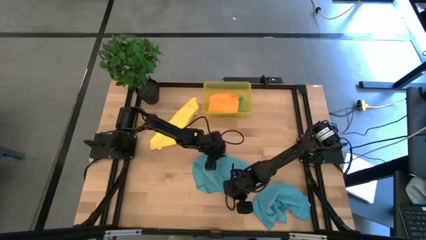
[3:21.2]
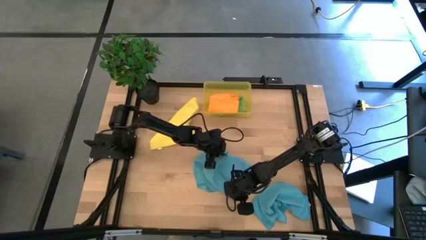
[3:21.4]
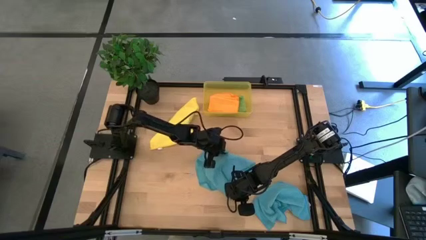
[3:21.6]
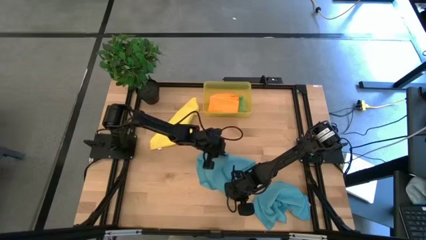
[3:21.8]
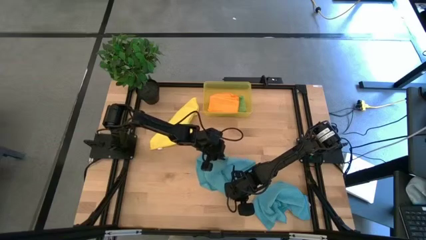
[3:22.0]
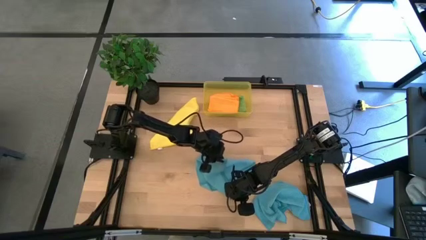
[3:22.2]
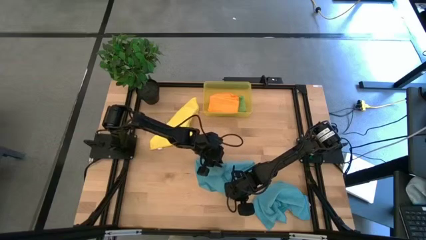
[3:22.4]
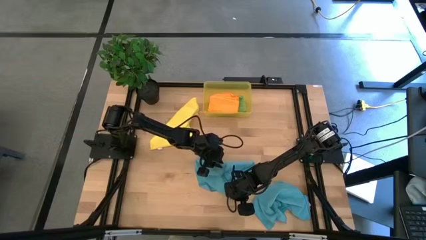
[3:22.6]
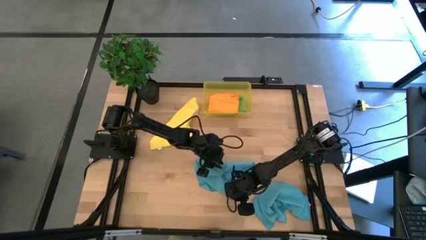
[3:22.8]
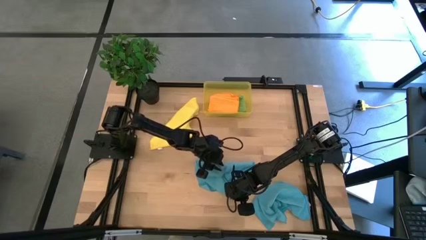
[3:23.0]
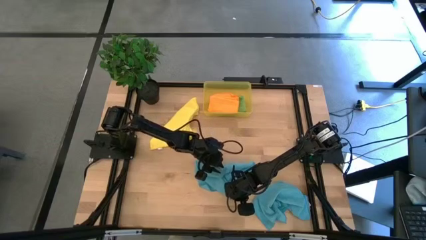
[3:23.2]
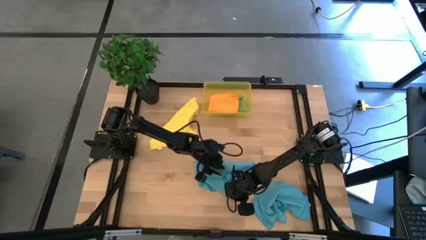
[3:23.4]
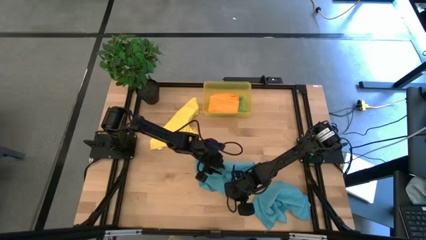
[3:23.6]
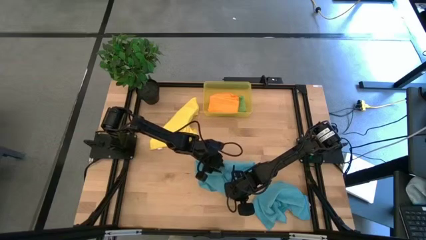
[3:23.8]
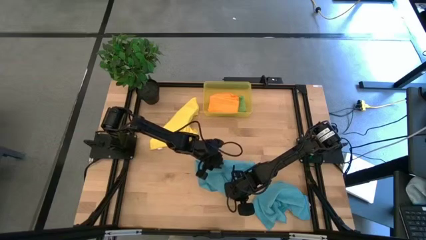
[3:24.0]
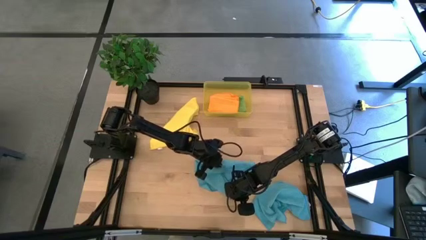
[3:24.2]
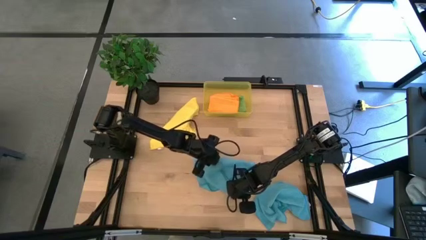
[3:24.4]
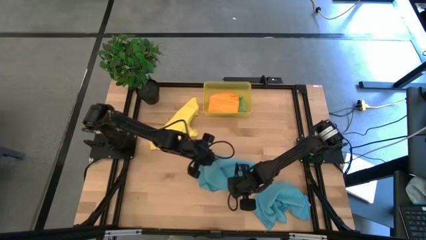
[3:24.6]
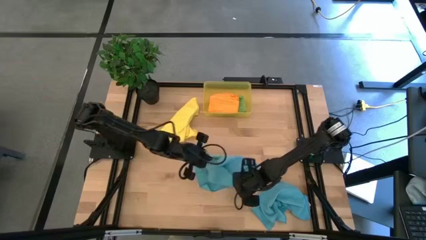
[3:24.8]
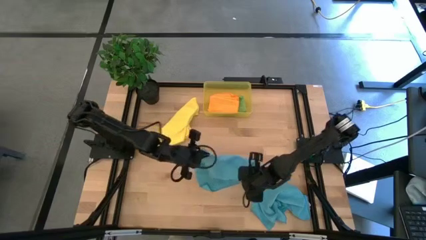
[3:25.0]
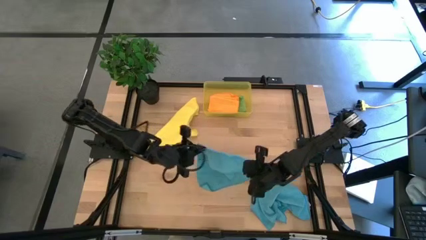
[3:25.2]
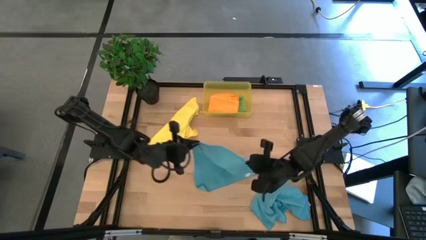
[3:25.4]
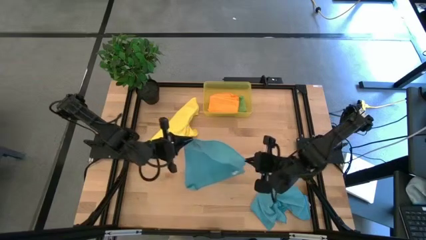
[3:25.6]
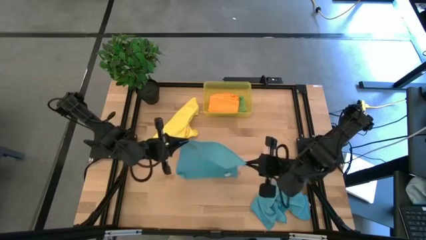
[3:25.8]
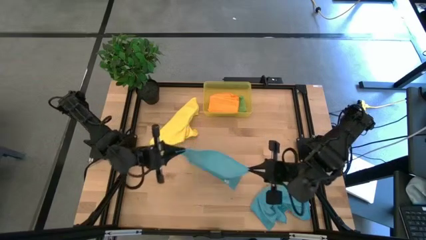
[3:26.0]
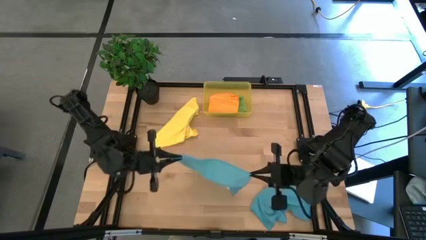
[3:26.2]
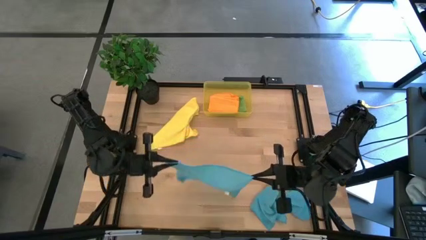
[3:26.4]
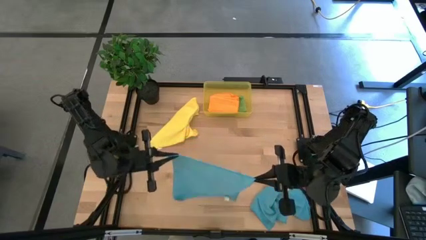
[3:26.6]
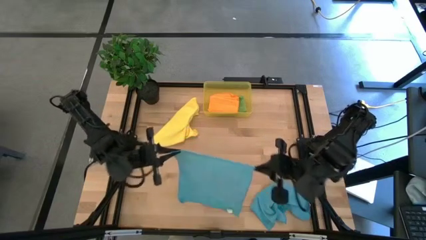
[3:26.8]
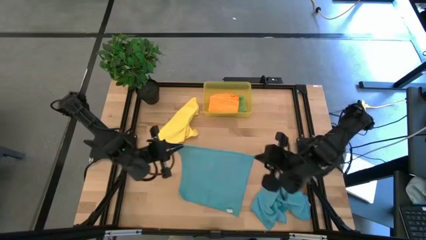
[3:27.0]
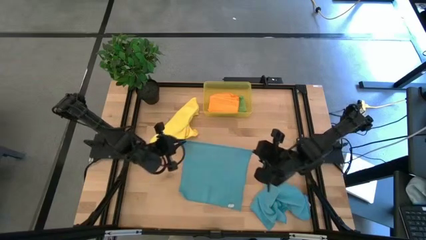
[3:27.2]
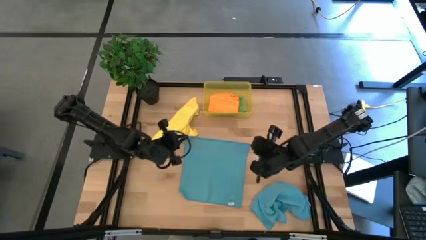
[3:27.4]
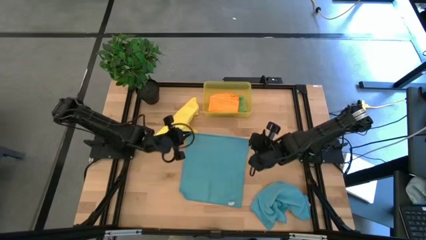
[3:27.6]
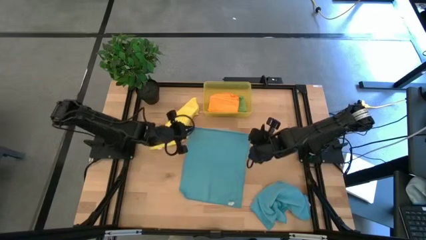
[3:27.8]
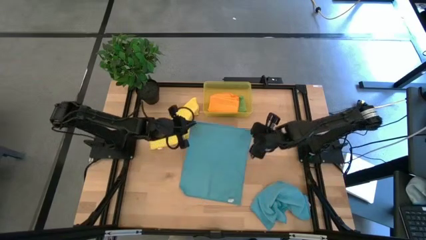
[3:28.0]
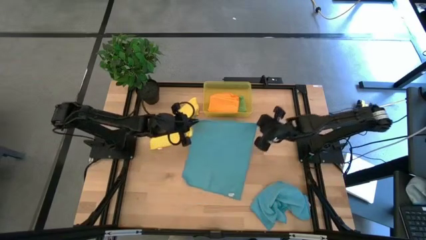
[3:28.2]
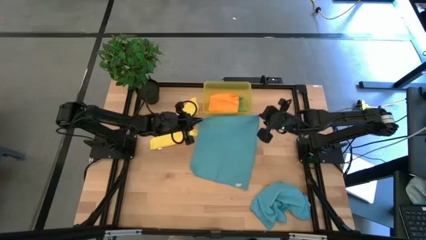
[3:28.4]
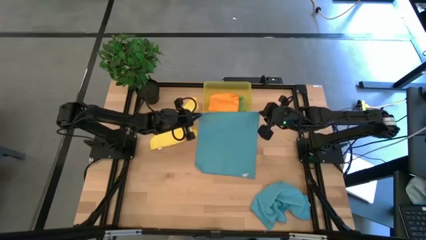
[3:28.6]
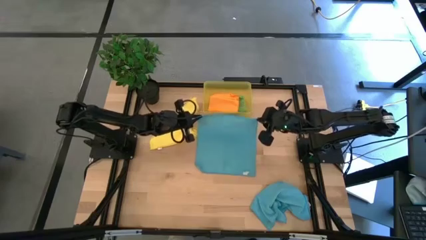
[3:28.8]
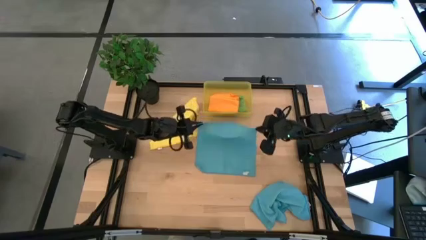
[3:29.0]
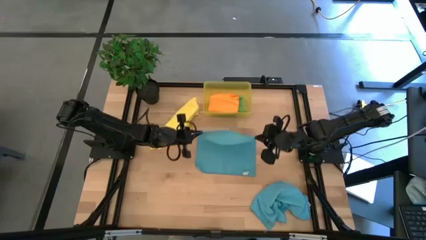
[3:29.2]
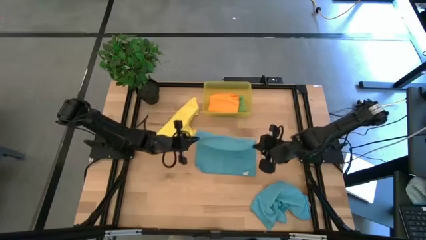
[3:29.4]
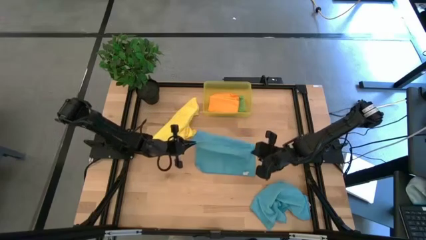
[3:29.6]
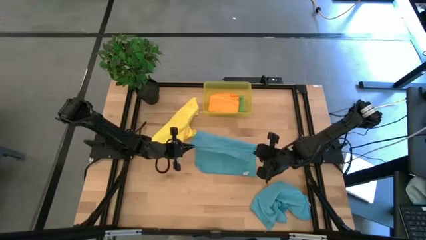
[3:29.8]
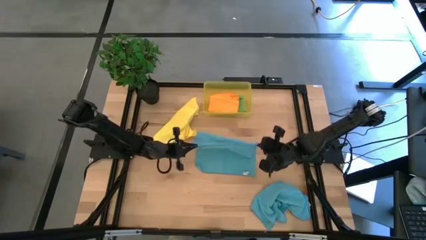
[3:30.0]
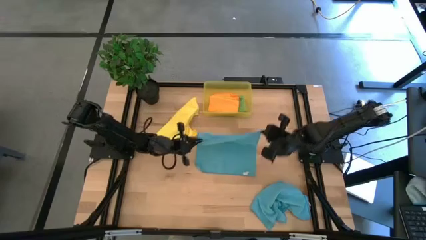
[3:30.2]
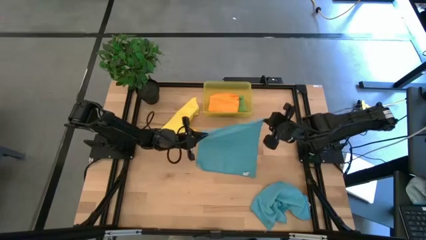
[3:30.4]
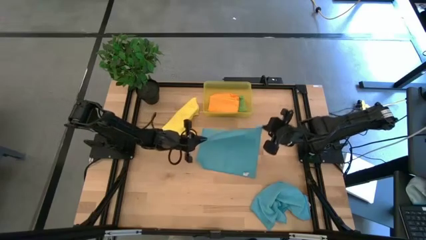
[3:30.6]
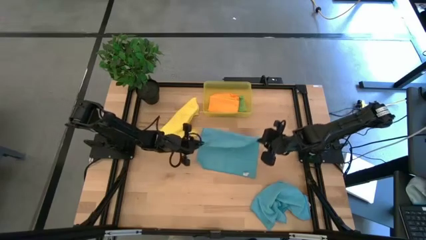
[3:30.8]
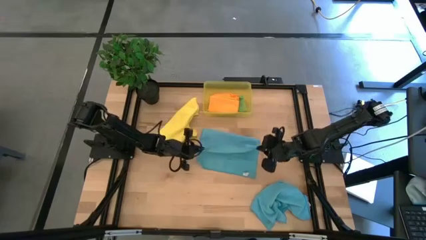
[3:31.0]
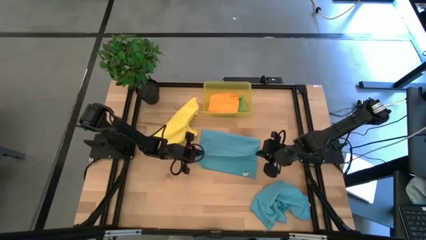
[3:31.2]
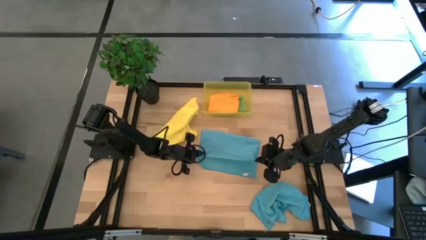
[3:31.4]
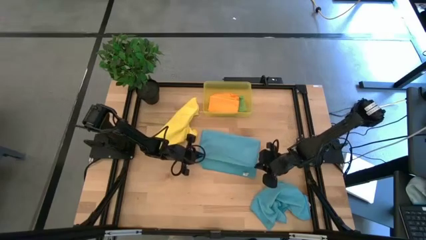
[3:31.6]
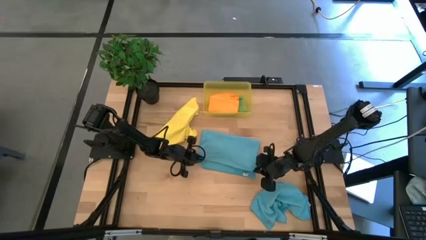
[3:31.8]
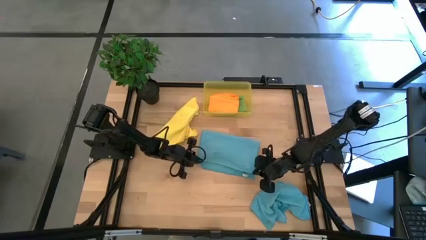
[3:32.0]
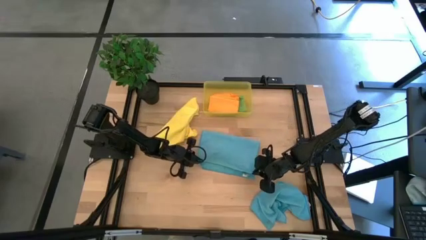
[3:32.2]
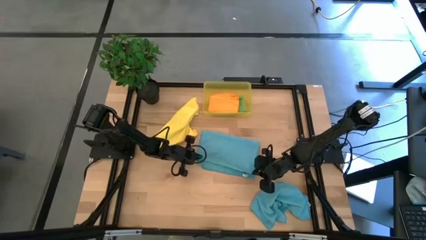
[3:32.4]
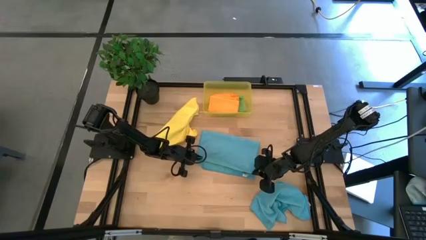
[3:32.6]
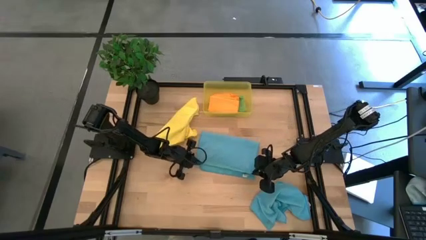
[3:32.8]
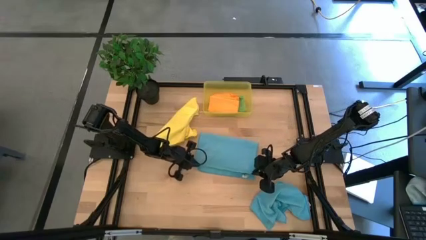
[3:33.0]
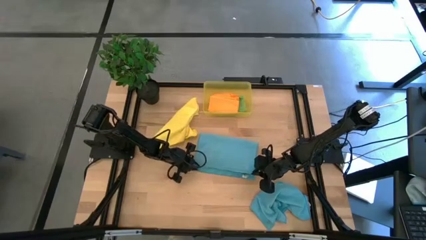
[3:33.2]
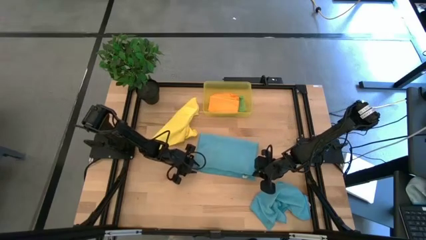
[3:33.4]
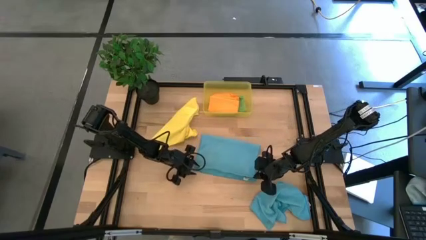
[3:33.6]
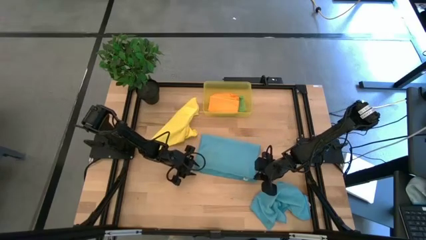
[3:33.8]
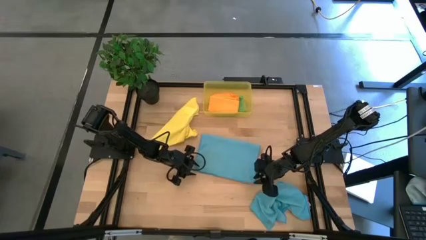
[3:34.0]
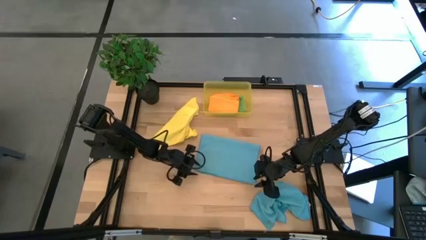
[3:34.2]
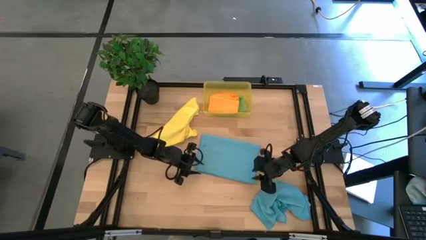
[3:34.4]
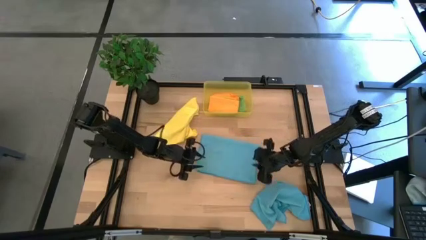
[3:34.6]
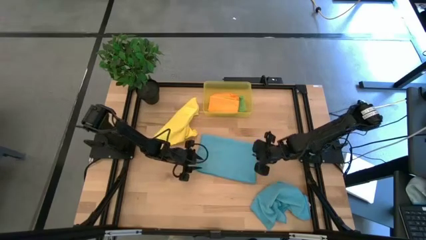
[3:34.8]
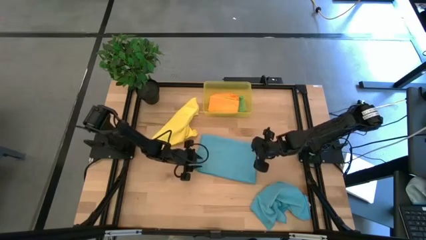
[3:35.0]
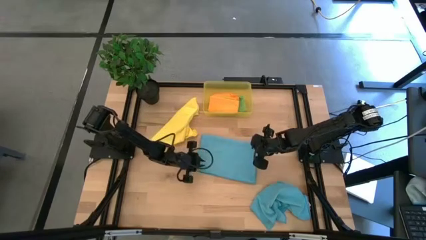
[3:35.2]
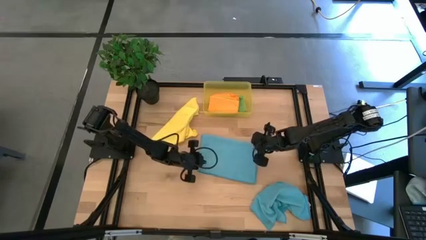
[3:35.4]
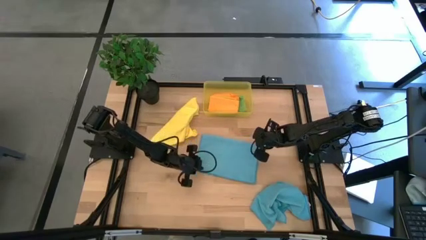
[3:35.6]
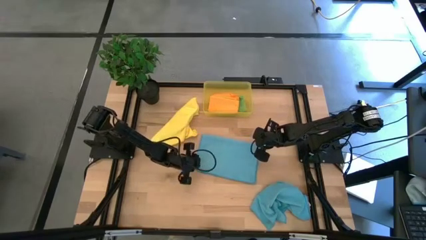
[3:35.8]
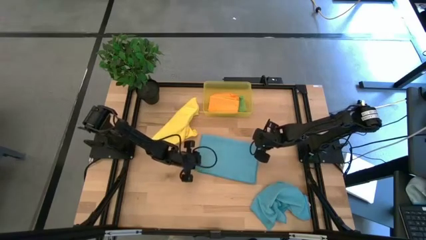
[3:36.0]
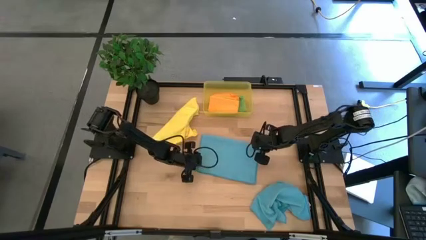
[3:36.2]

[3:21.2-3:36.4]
Task: Fold microfiber towels
Fold the top blue microfiber cloth
